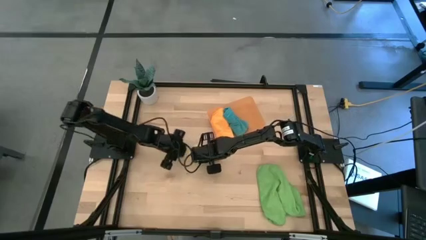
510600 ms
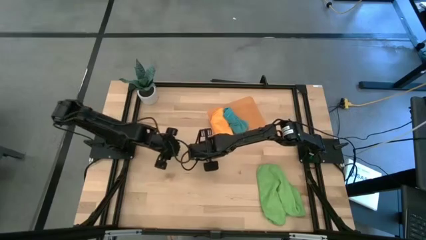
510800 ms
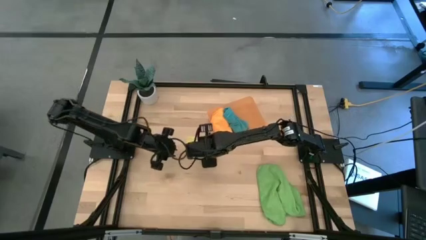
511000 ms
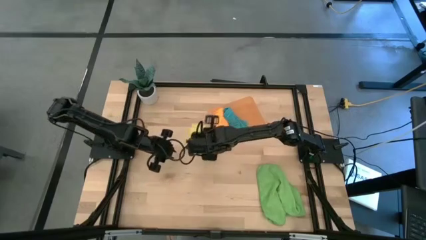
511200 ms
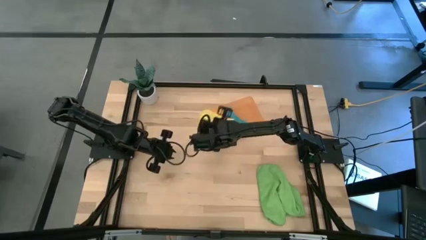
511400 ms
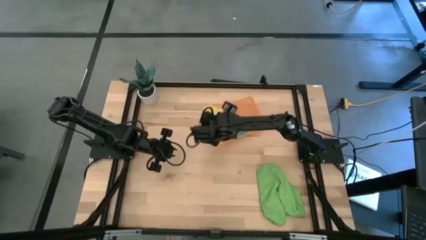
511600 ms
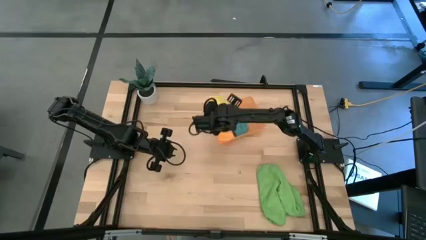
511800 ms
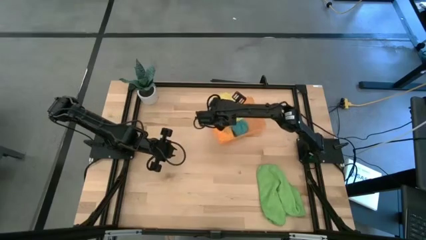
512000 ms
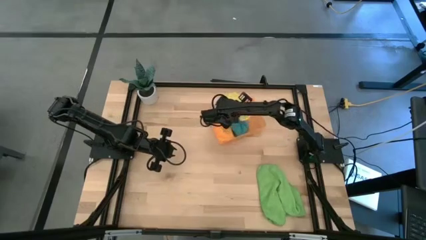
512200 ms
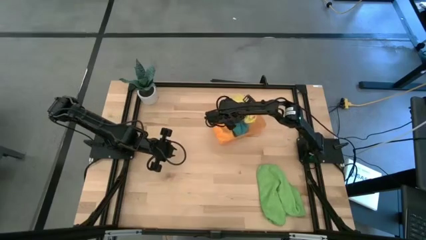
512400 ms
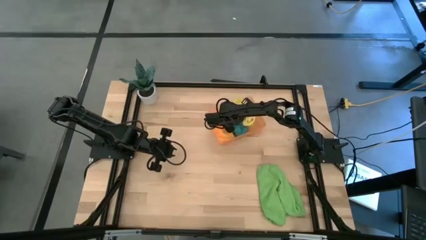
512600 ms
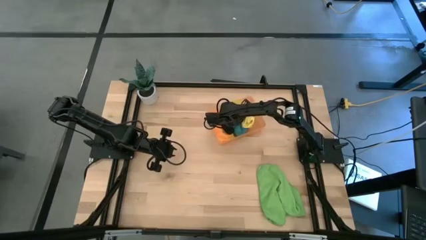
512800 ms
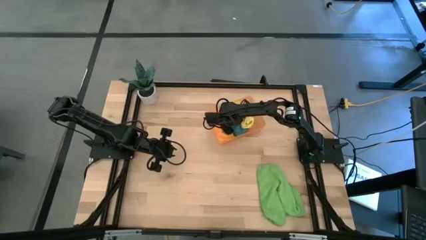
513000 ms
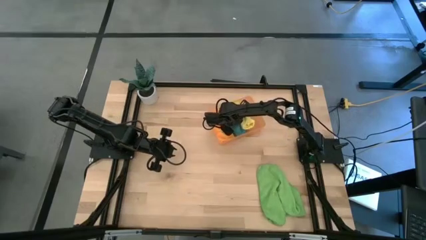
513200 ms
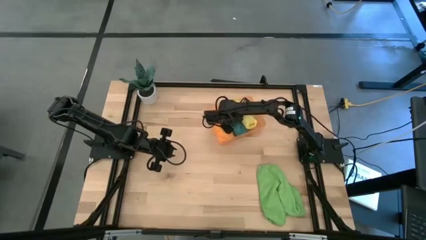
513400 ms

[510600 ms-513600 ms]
Task: Roll microfiber towels into tight, uniform cylinder then place into a basket
Put the yellow microfiber towel into the bin

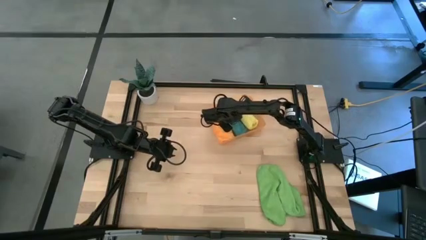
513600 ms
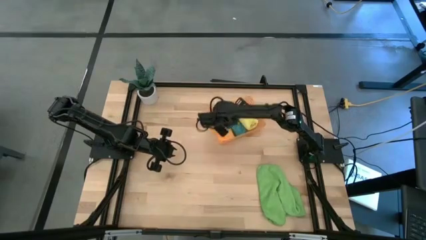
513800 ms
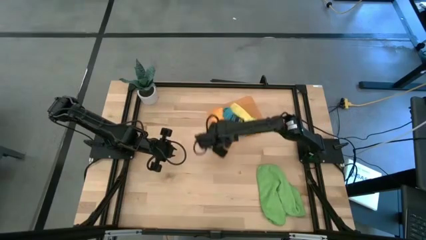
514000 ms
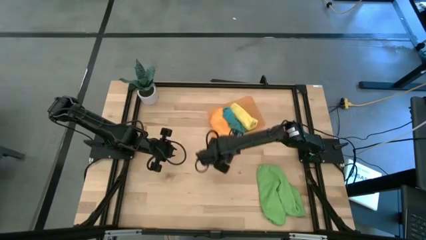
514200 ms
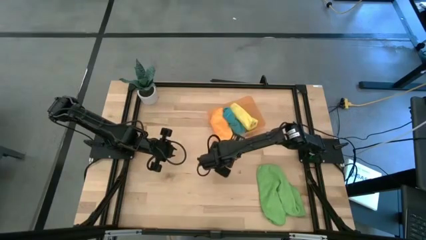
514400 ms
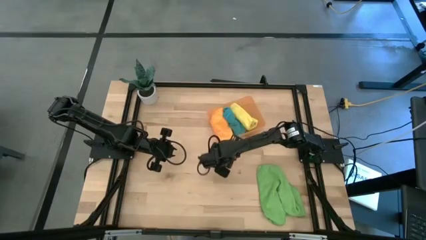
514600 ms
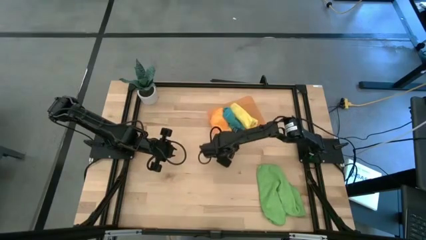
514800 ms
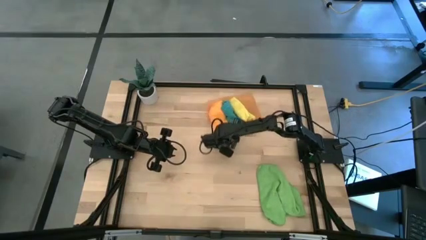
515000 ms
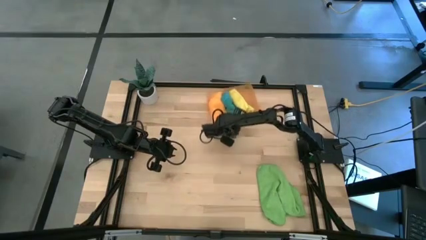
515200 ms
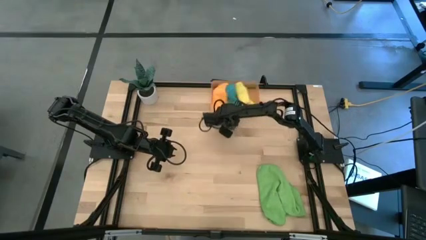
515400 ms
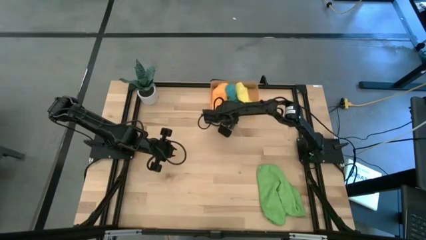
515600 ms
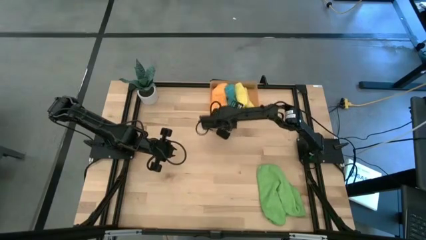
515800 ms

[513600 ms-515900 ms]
Adjust the bin

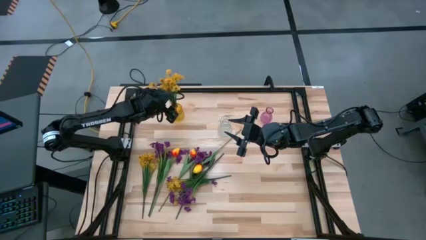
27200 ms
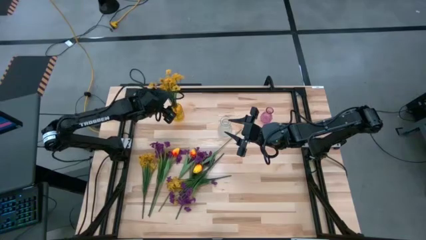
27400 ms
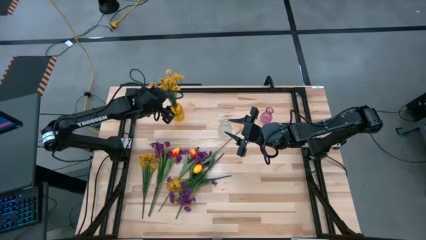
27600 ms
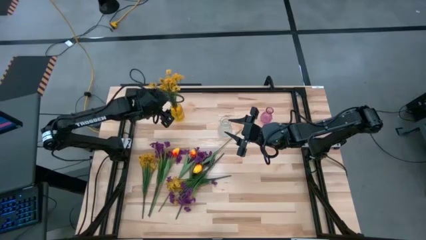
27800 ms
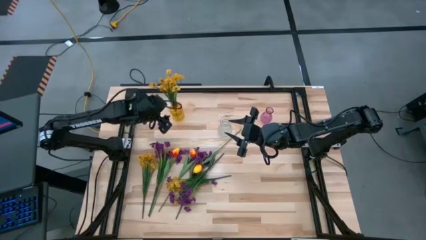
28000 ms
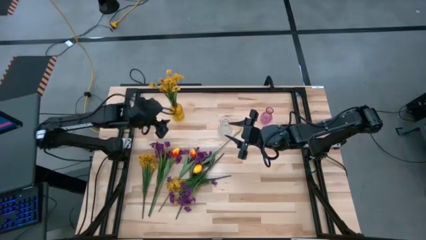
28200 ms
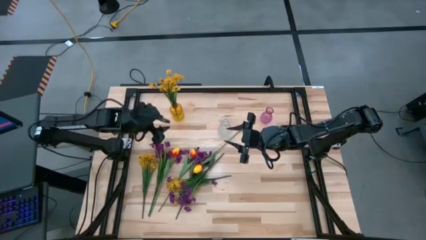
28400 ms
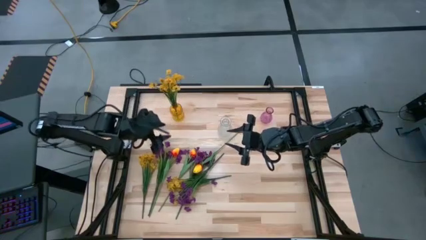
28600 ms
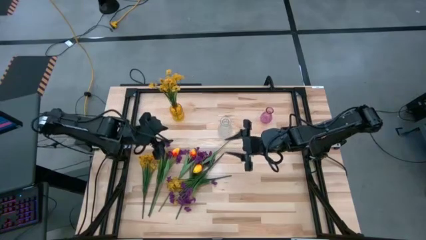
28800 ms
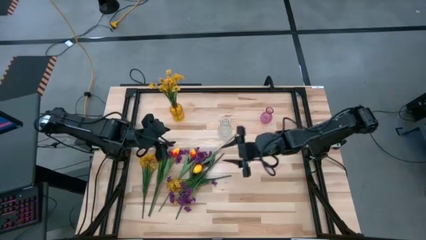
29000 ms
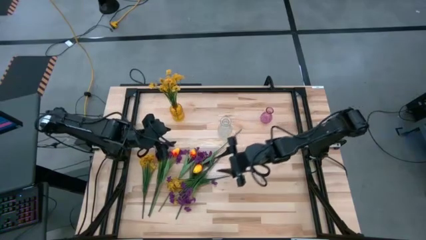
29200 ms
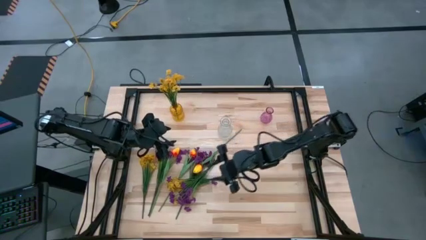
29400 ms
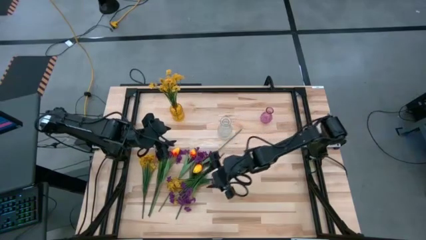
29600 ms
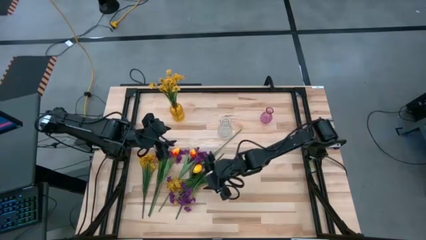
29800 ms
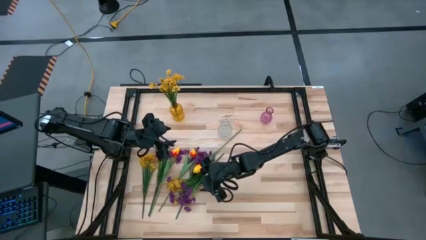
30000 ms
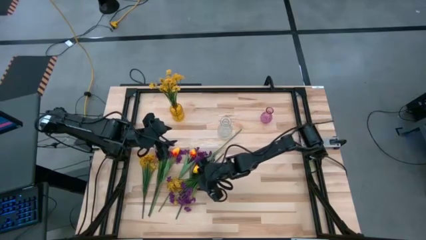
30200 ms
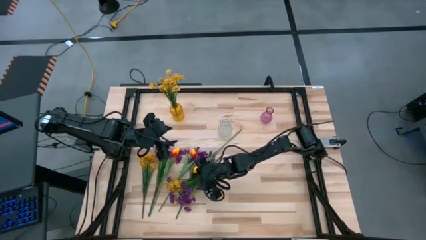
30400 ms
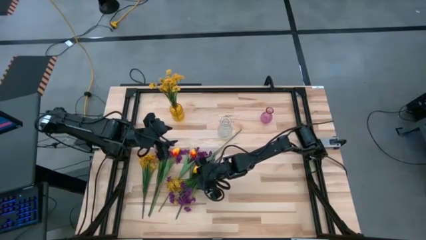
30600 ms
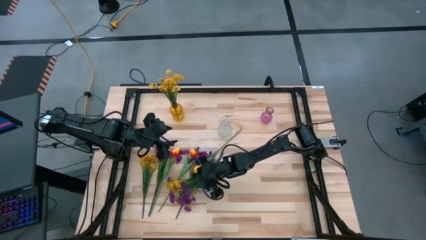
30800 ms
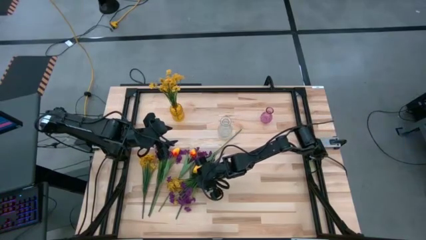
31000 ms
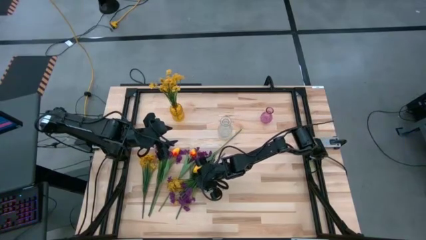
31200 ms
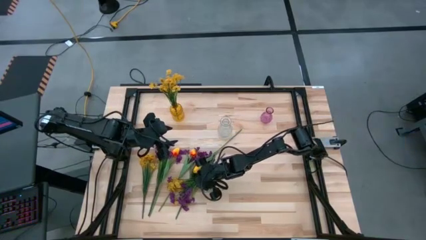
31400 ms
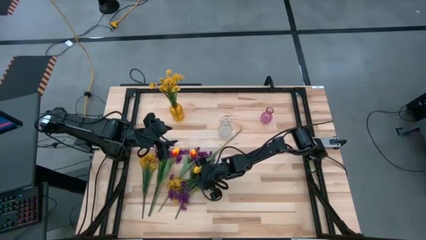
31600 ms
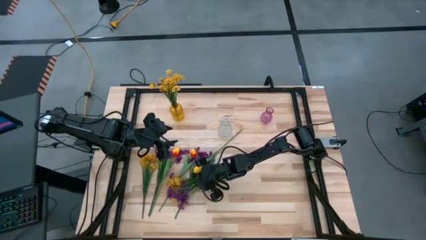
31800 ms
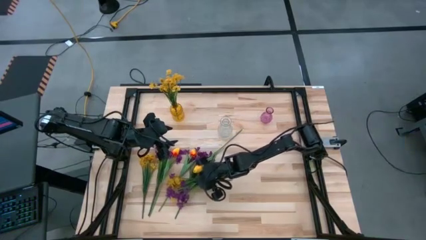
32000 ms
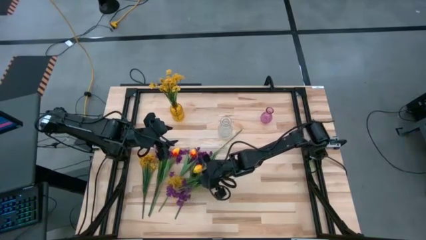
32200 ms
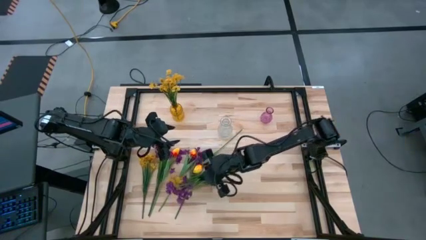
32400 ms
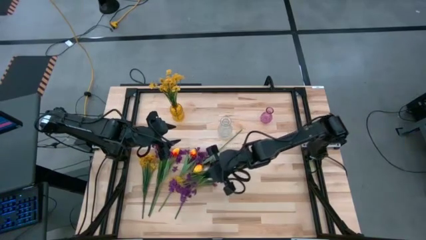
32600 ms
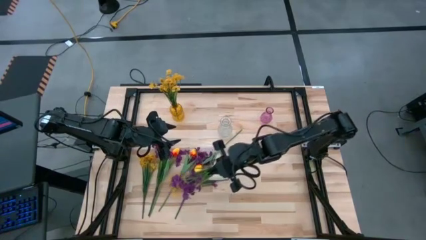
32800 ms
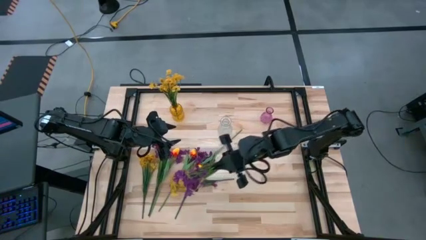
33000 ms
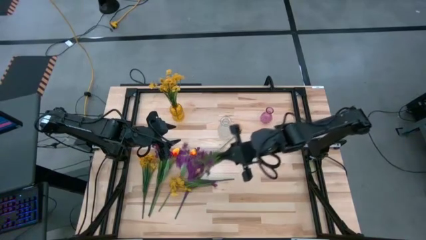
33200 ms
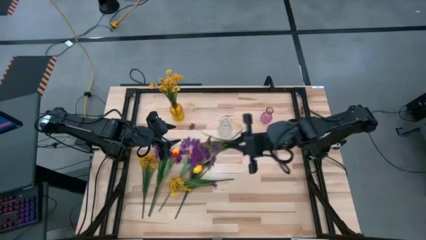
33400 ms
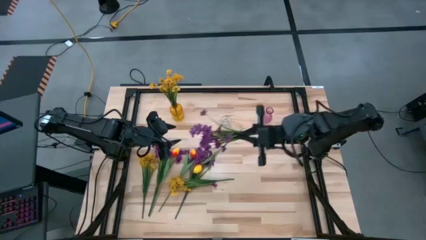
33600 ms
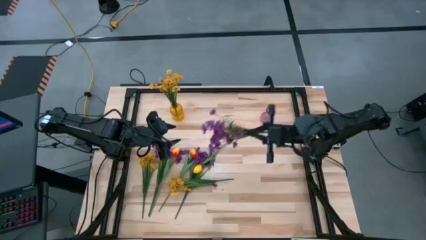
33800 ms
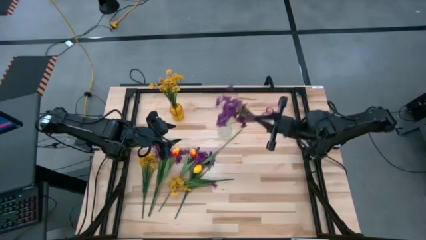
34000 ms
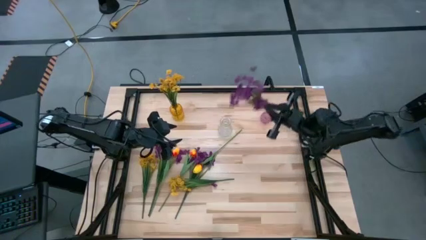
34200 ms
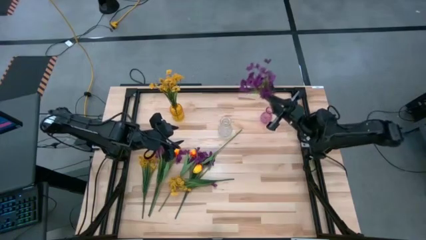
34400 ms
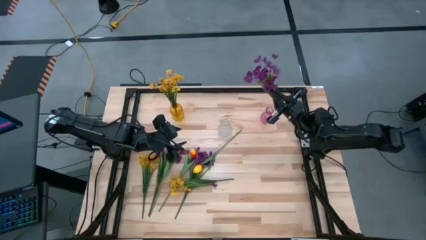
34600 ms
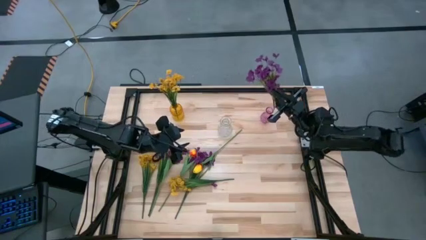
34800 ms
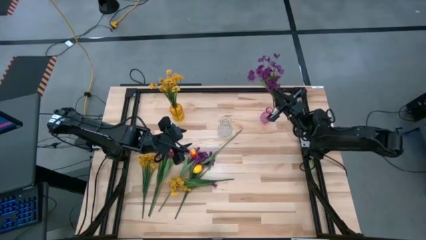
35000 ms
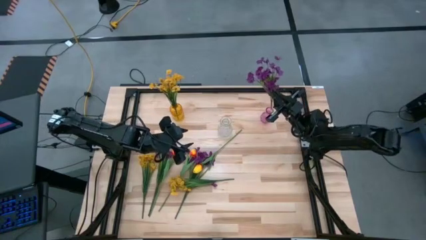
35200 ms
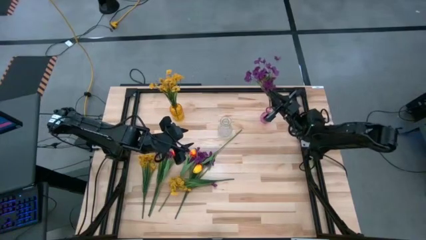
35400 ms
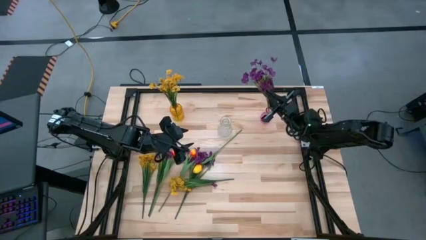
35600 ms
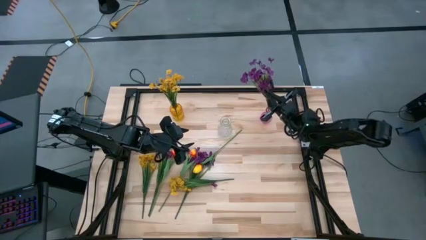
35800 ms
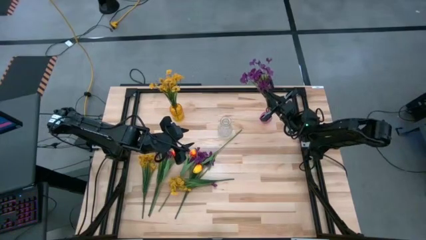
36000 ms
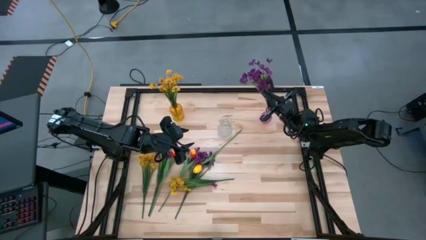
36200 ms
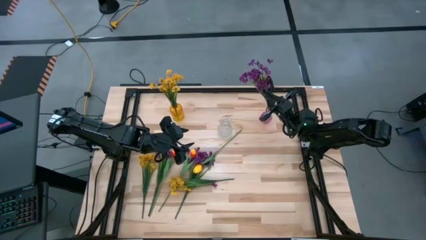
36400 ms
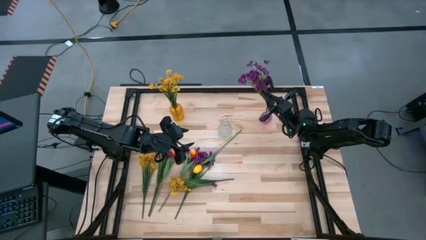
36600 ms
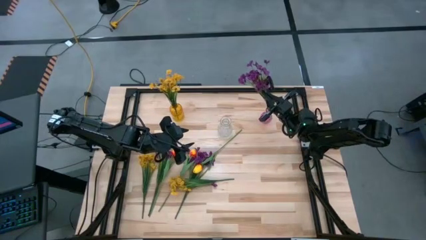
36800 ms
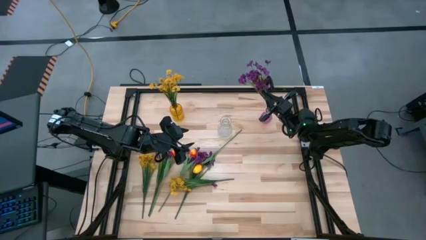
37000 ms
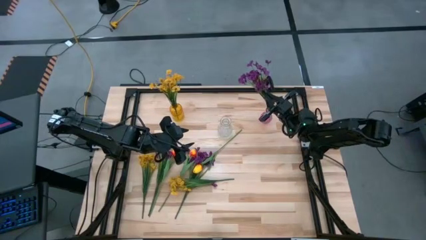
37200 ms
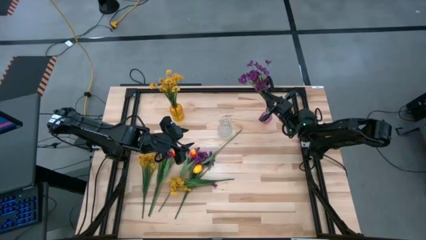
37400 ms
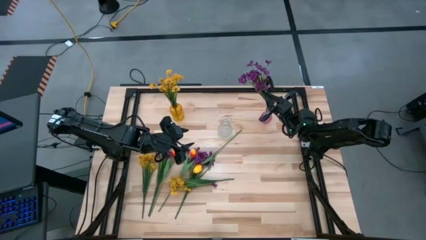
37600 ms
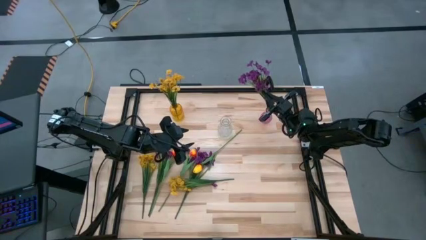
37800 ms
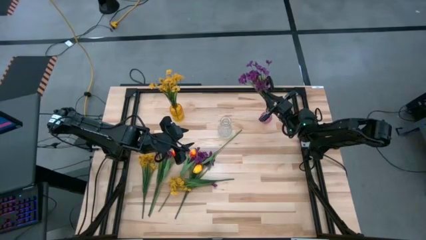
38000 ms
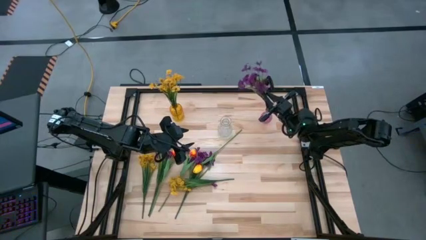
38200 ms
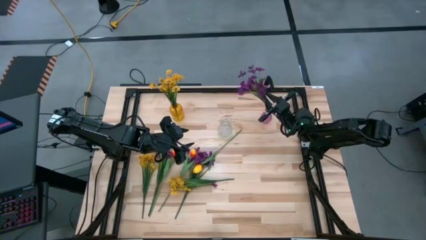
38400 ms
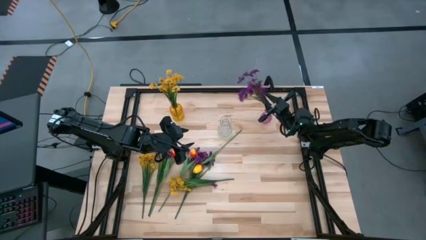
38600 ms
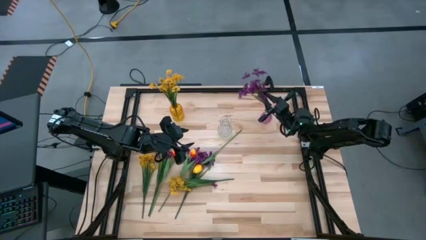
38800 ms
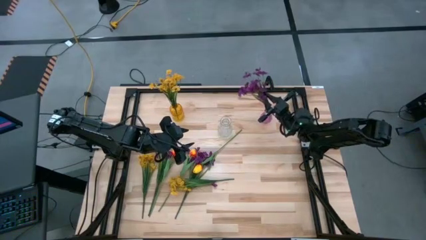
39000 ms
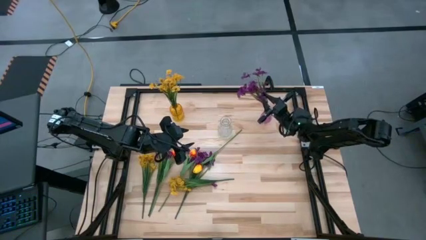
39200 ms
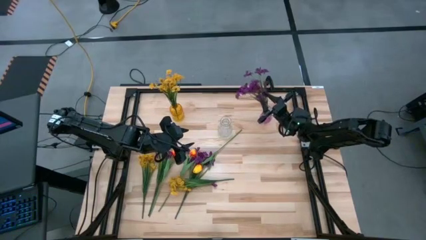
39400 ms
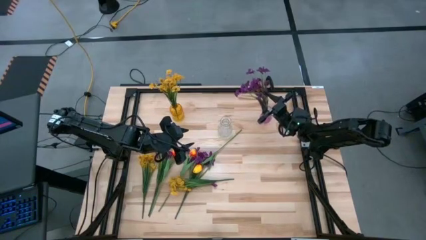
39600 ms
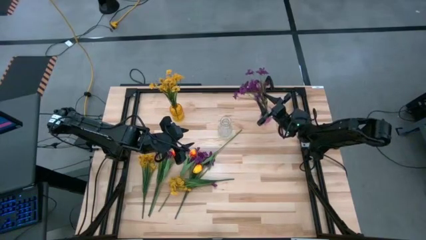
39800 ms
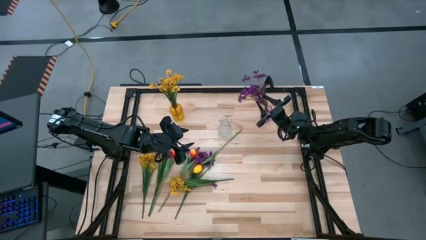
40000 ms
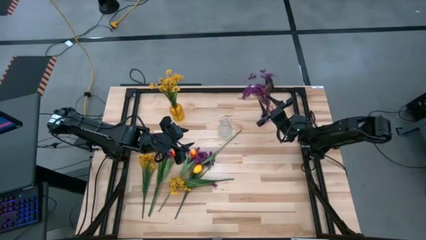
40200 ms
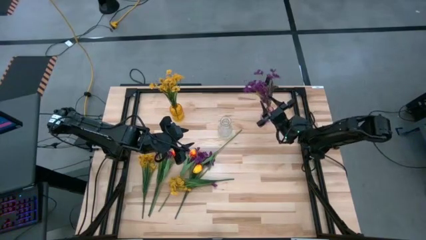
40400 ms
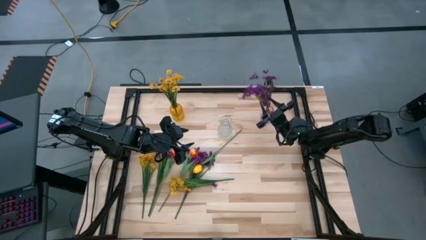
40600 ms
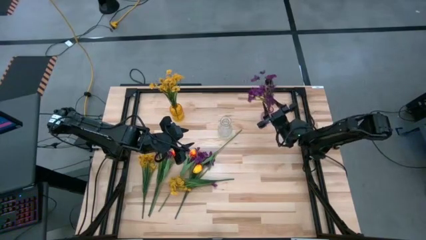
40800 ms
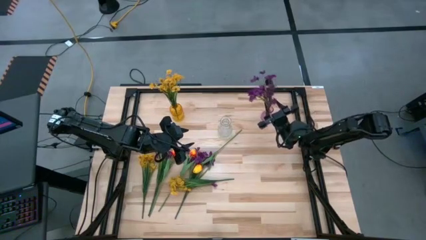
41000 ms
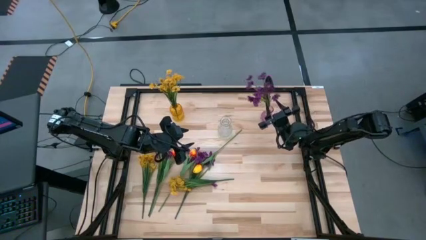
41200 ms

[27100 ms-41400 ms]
Task: Sort flowers into vase by color
Put the violet flowers into the pink vase
